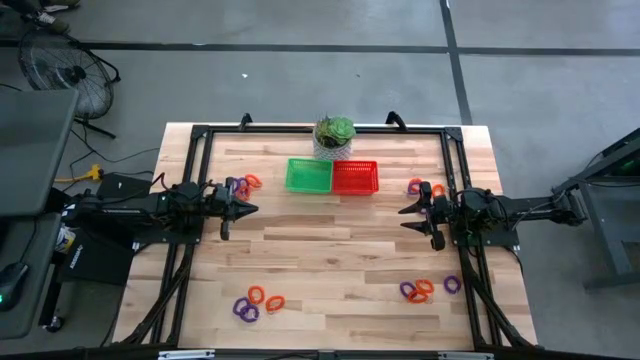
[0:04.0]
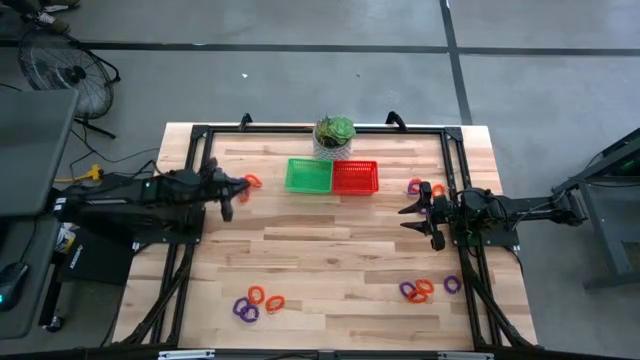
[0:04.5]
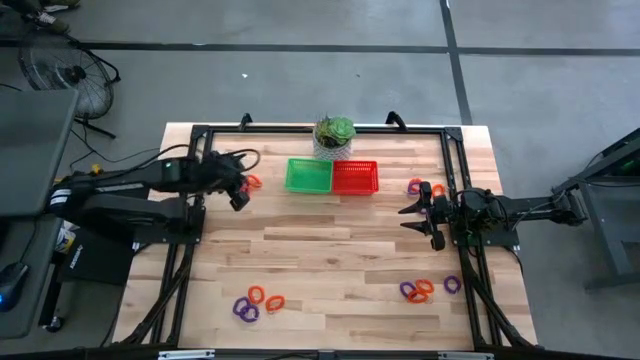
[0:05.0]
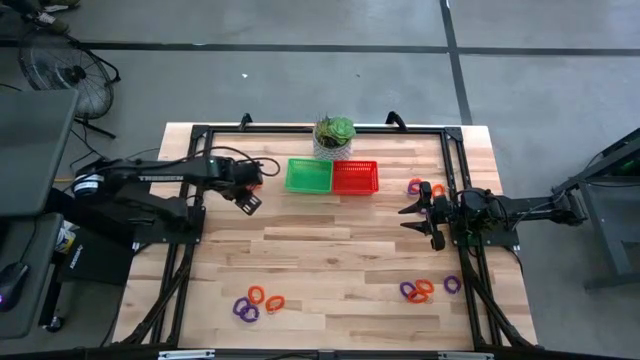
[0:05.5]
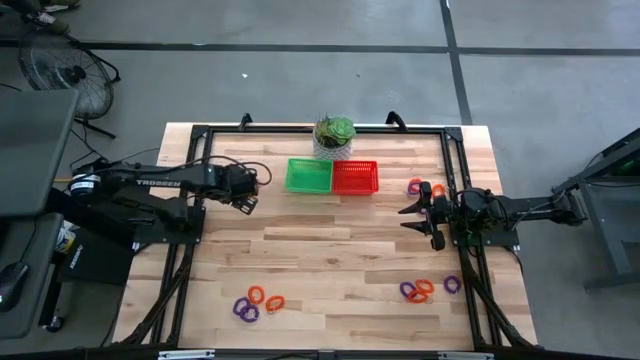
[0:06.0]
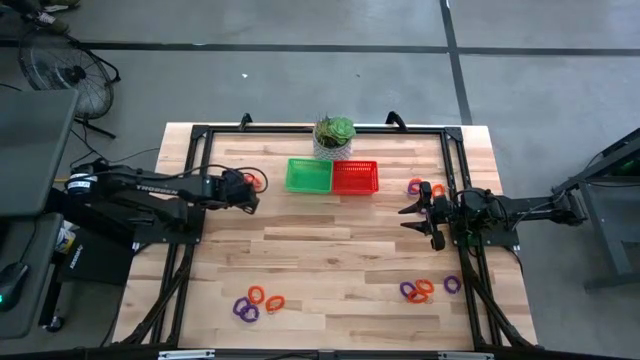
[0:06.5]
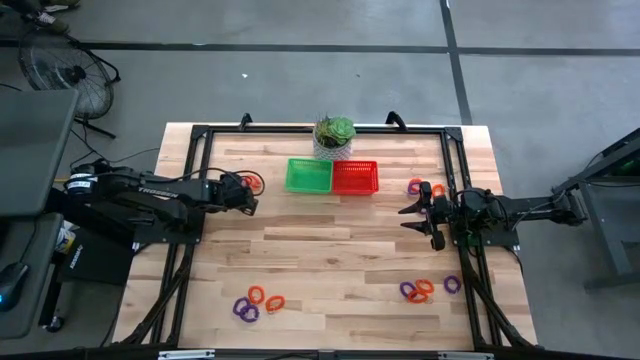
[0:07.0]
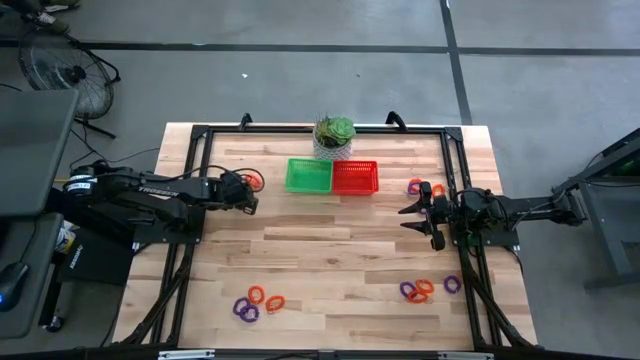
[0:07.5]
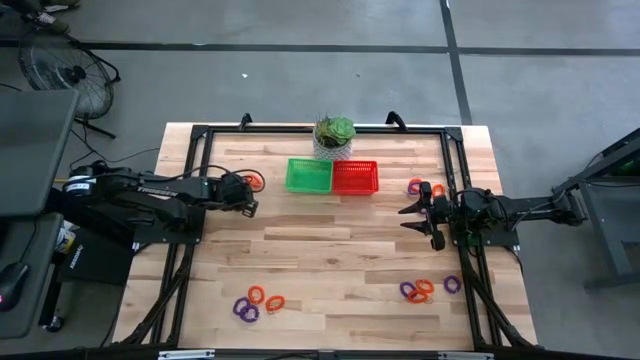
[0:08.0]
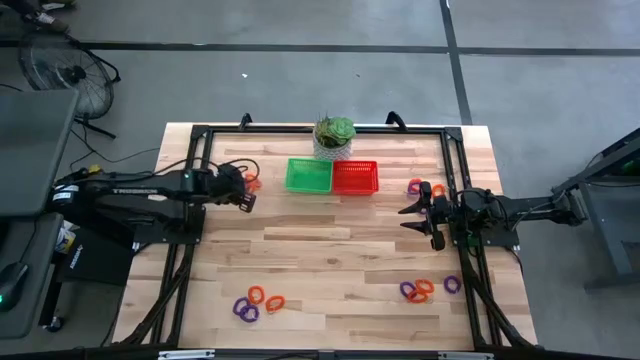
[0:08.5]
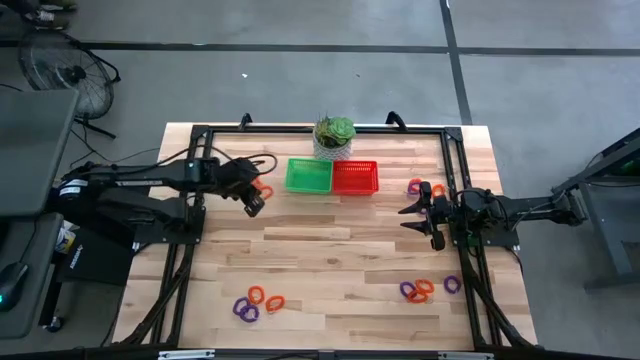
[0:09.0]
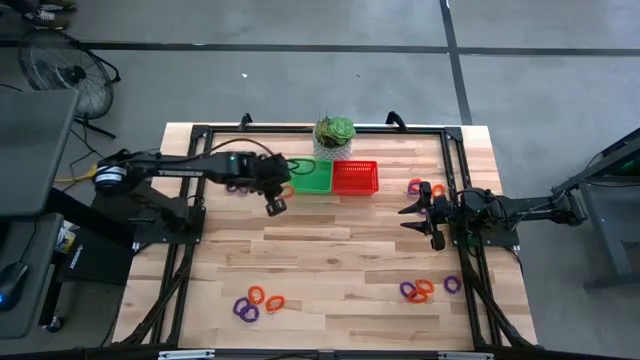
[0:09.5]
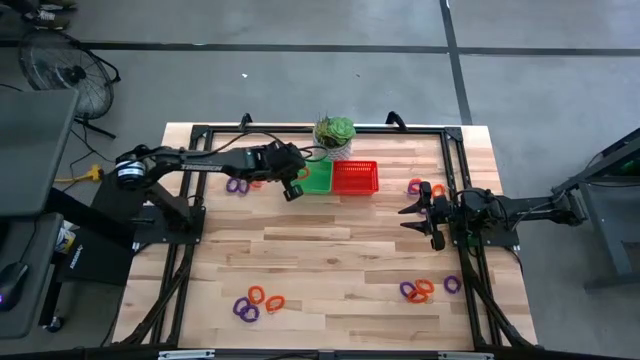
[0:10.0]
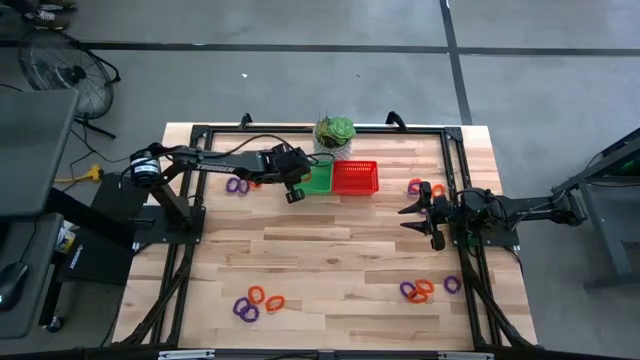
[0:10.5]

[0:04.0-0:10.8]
Task: Sort spring keychains
Put the orange spring keychain into the green bin

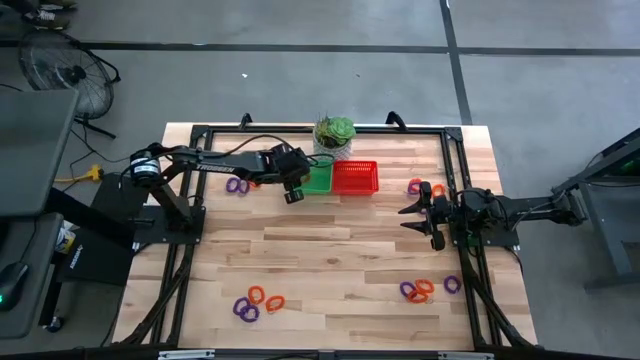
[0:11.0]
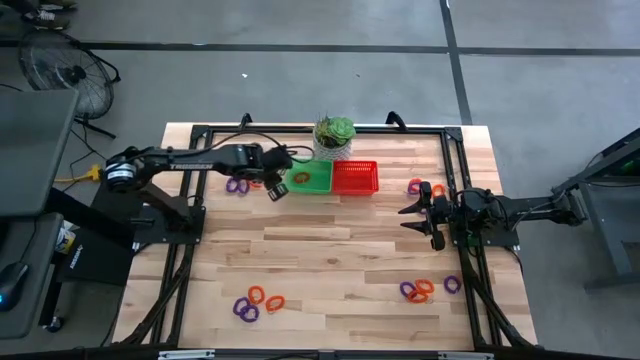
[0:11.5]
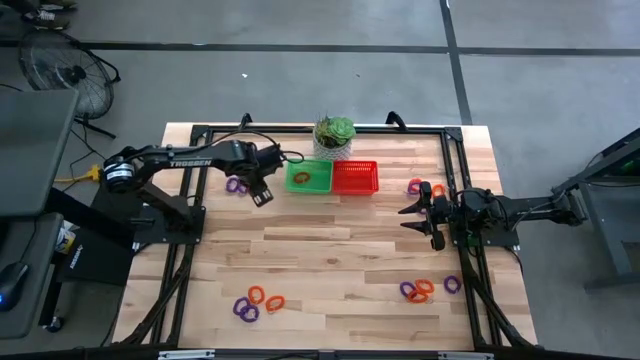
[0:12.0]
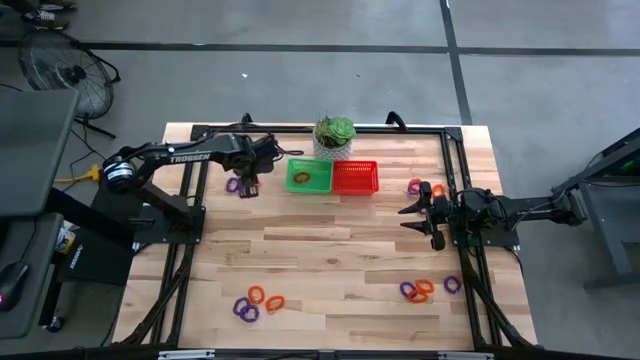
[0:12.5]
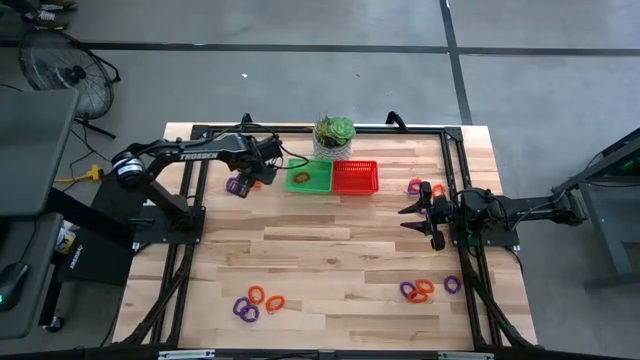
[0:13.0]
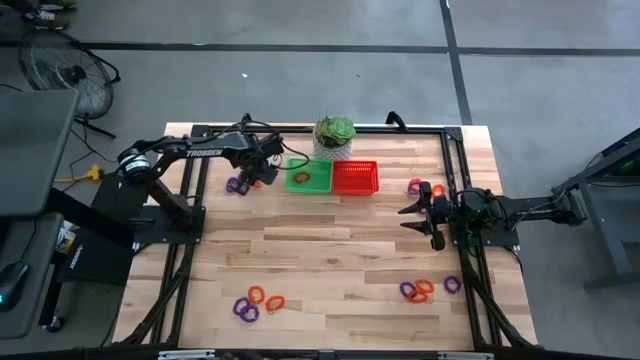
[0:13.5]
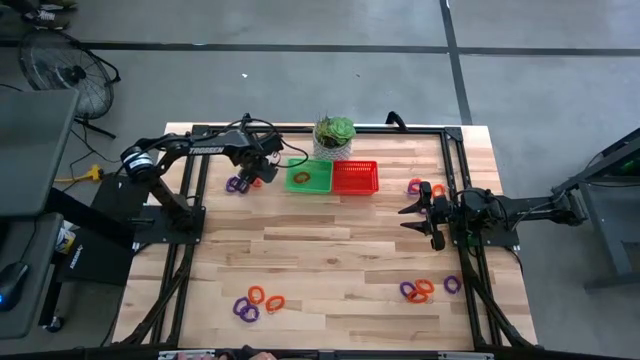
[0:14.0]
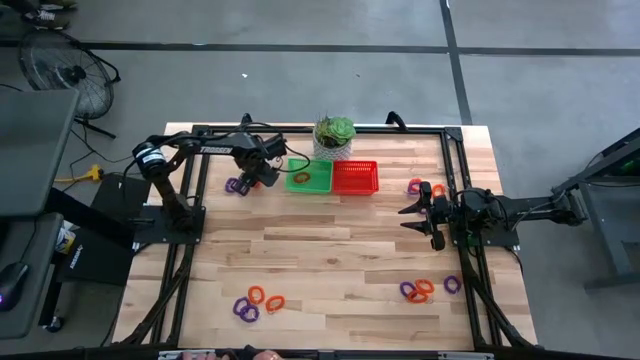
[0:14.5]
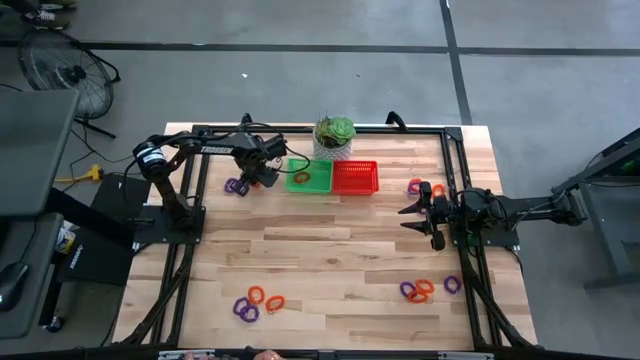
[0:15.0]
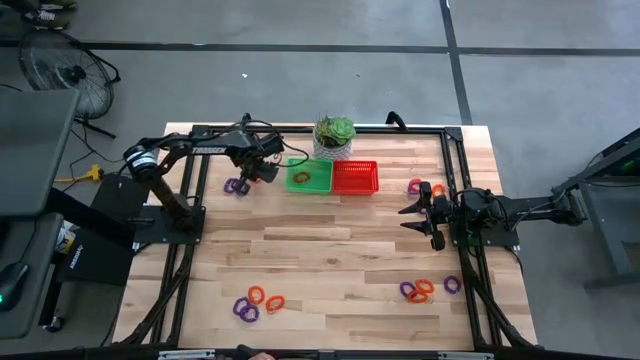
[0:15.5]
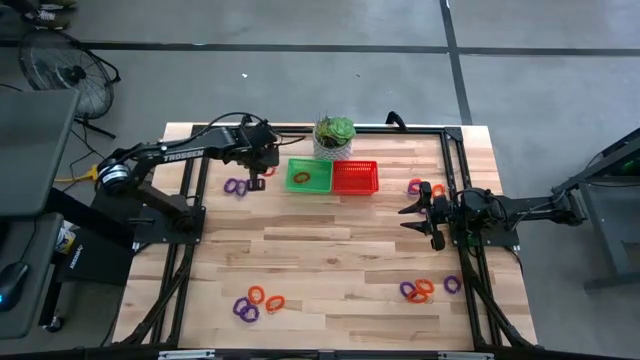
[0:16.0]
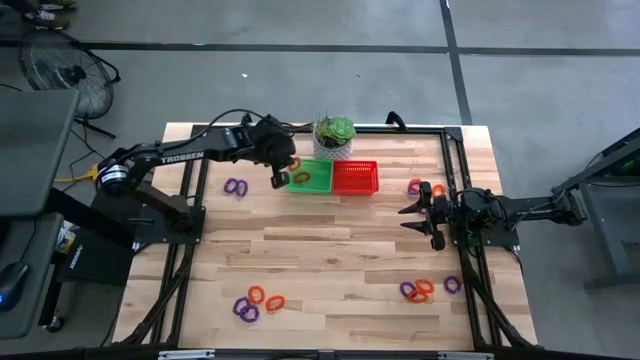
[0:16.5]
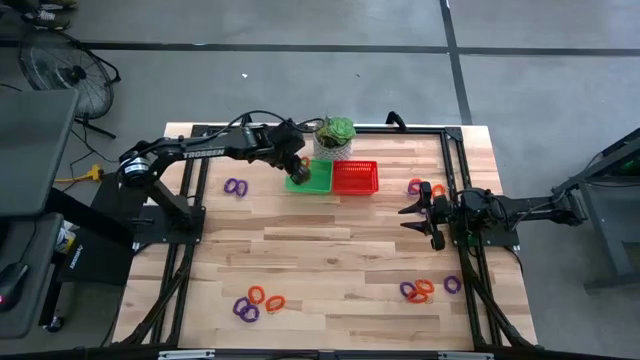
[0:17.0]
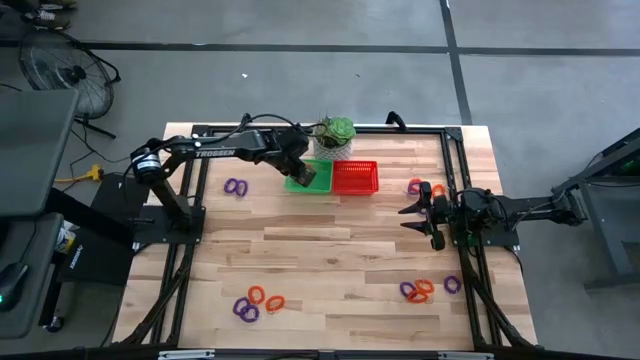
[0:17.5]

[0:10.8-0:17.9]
Put the orange spring keychain into the green bin

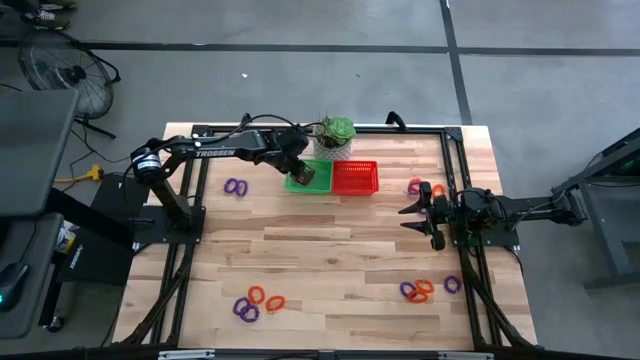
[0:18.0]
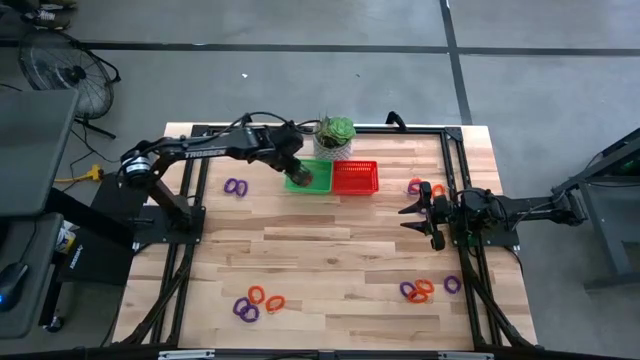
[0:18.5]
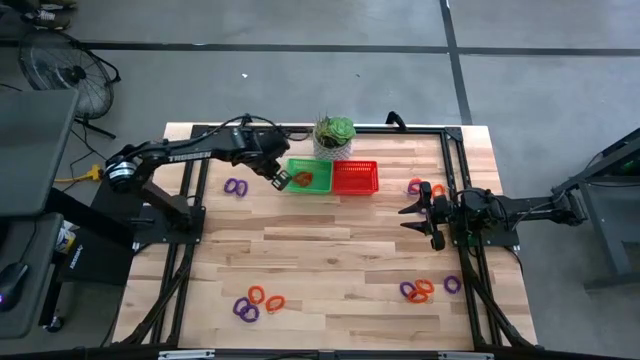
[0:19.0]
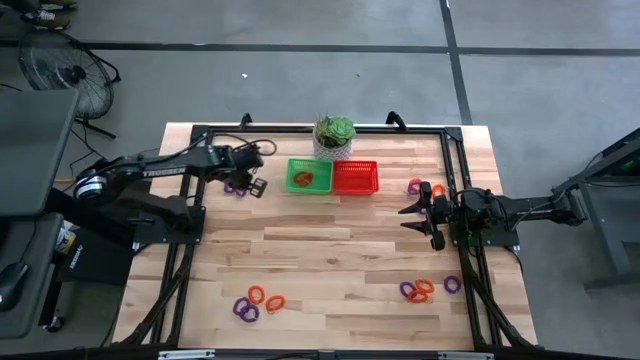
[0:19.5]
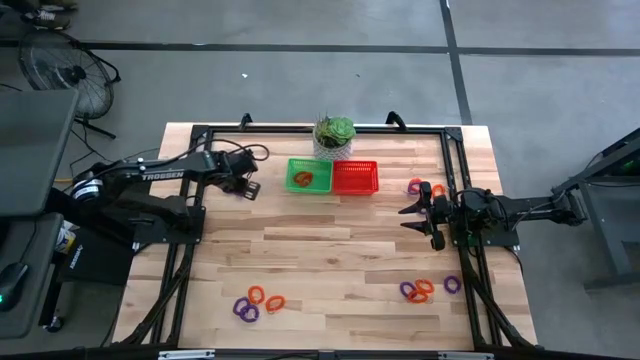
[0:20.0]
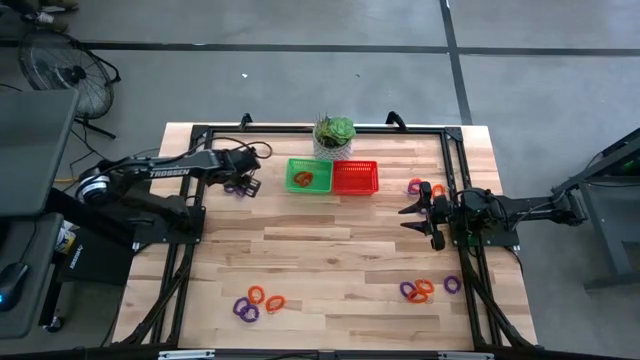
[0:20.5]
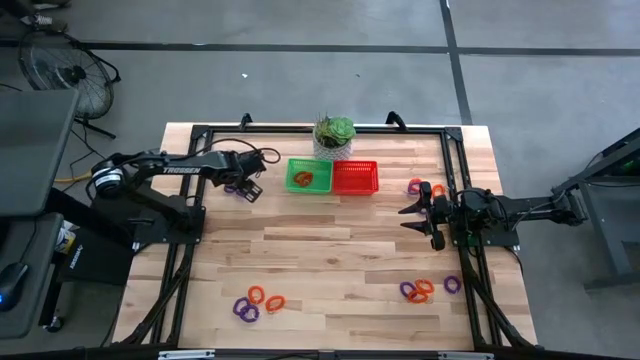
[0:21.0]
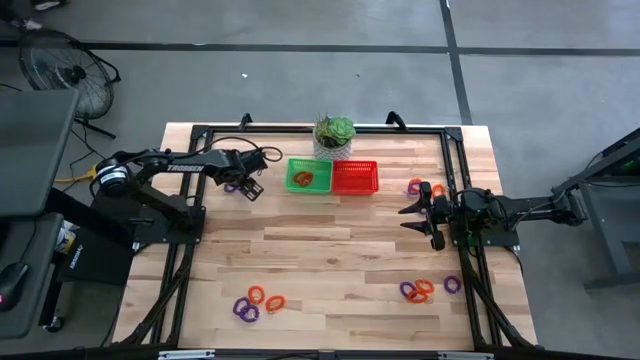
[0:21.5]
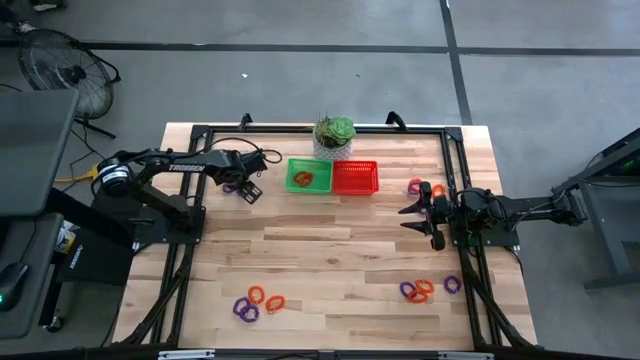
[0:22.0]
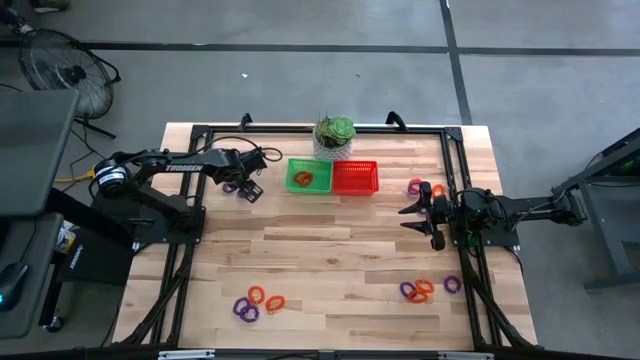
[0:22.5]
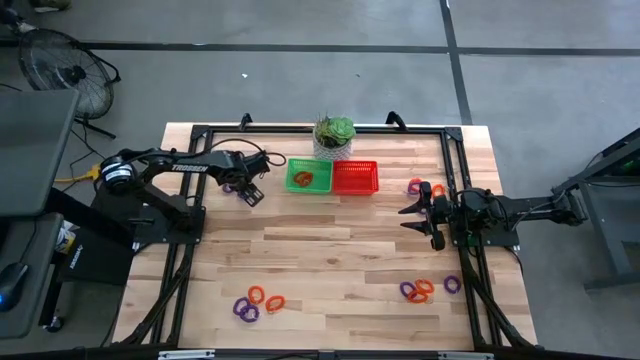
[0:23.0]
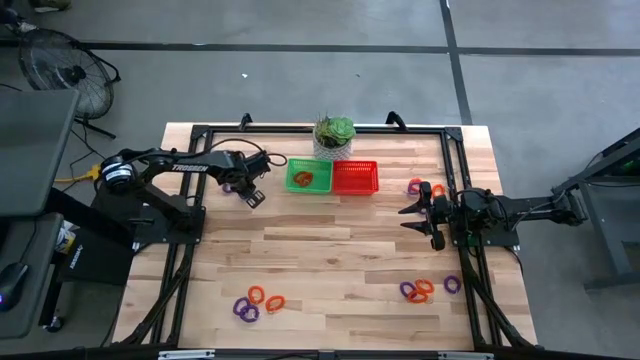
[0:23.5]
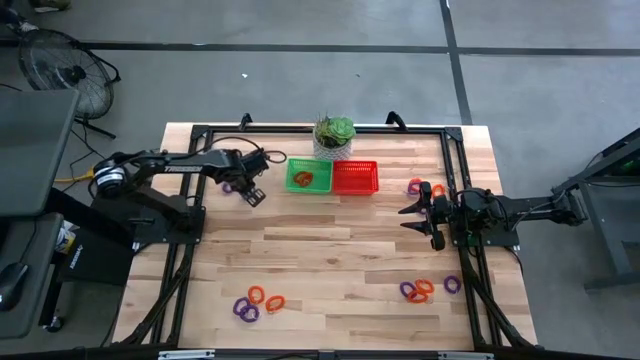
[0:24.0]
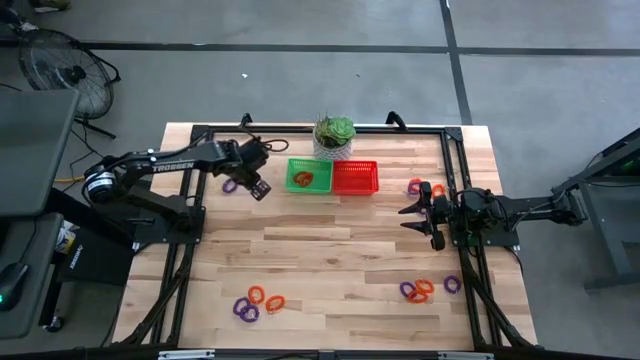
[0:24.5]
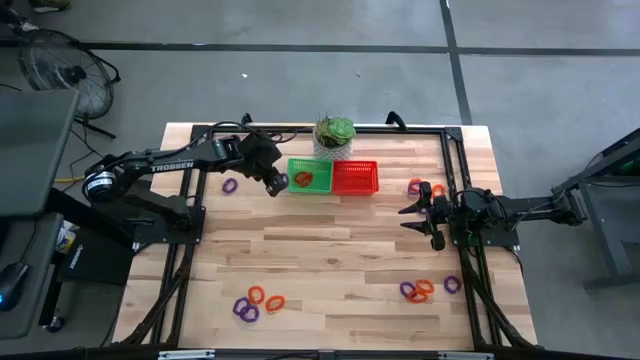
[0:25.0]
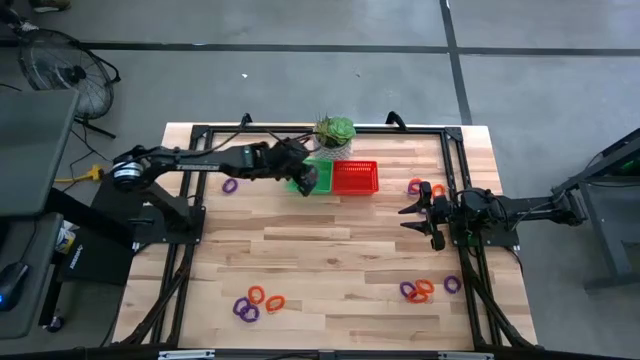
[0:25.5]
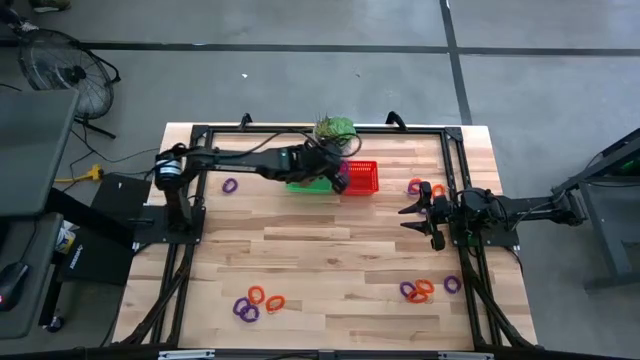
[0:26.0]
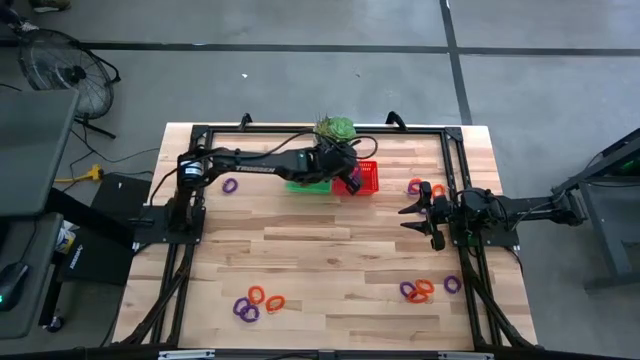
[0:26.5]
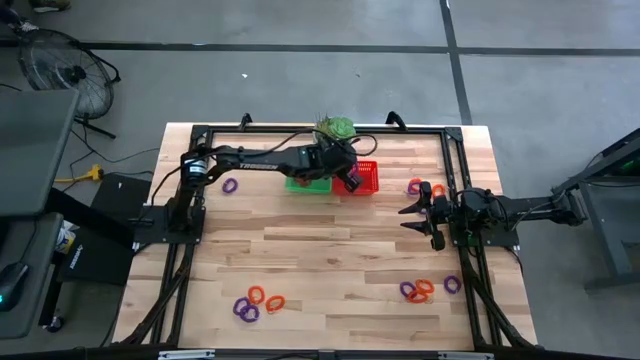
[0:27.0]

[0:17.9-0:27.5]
Put the purple spring keychain into the orange bin
